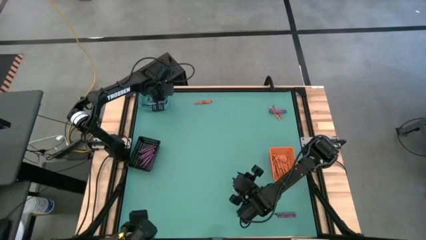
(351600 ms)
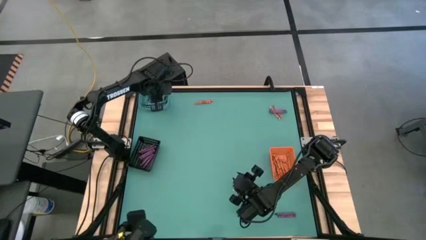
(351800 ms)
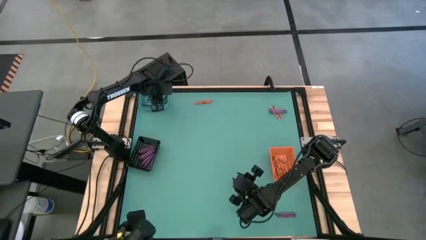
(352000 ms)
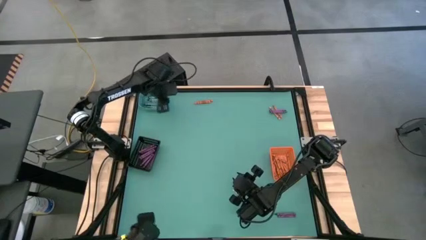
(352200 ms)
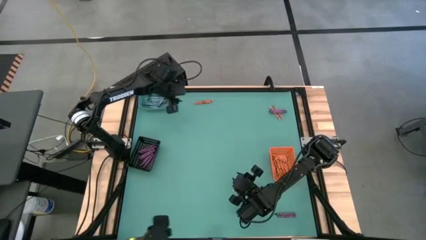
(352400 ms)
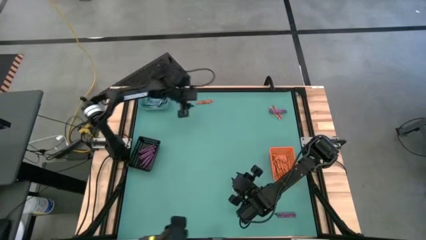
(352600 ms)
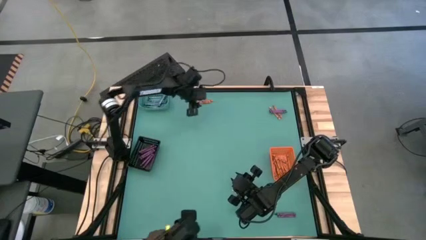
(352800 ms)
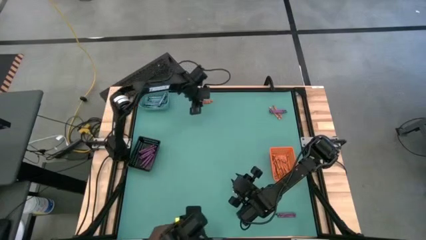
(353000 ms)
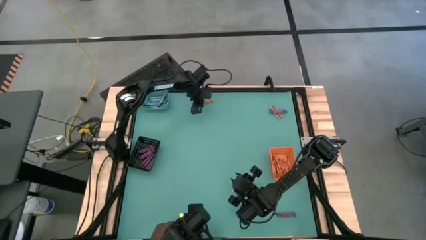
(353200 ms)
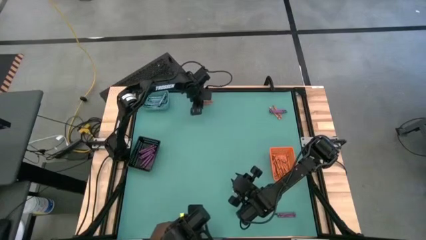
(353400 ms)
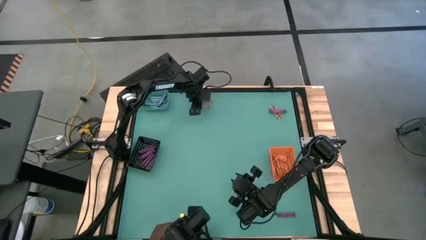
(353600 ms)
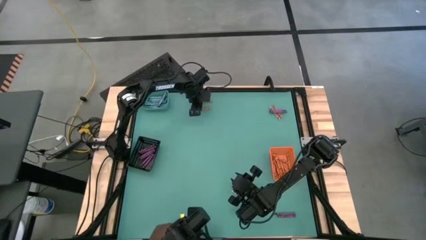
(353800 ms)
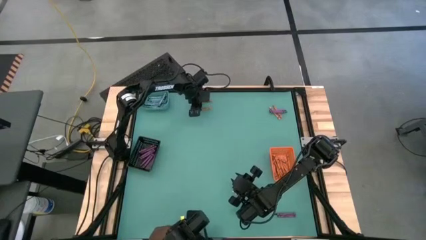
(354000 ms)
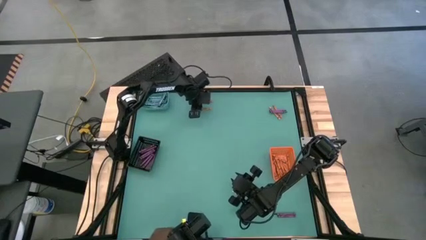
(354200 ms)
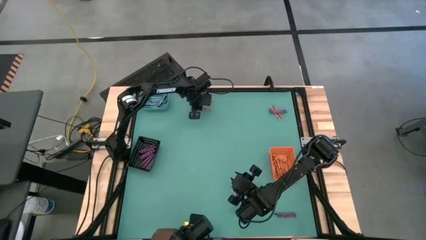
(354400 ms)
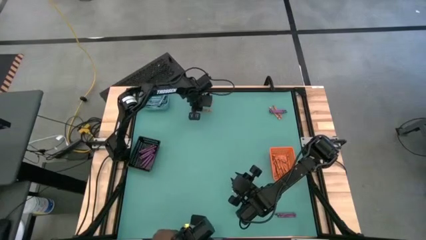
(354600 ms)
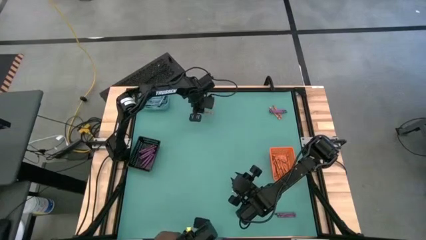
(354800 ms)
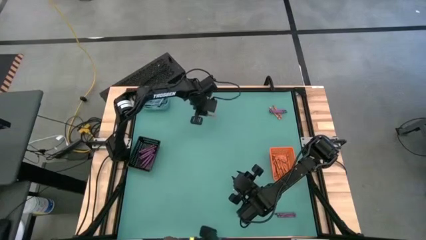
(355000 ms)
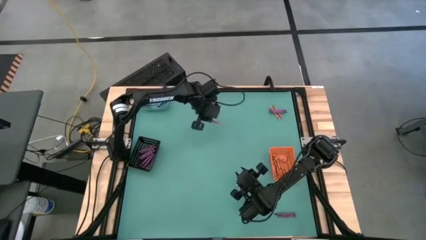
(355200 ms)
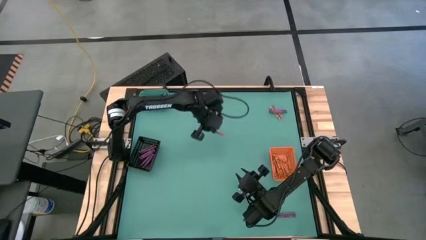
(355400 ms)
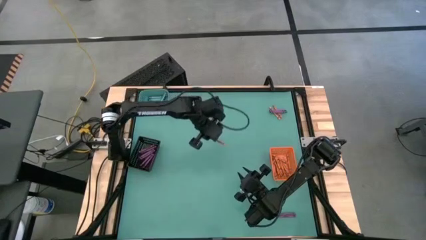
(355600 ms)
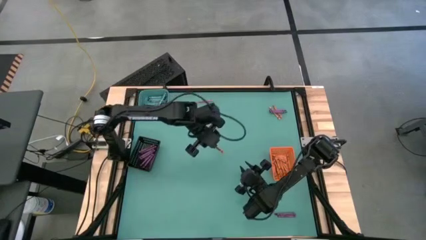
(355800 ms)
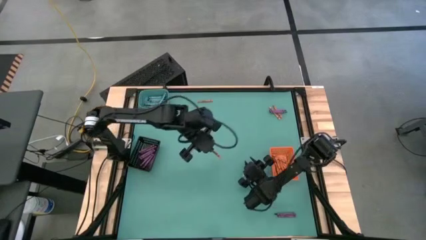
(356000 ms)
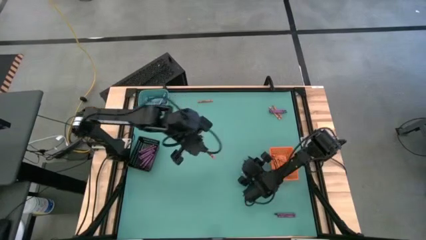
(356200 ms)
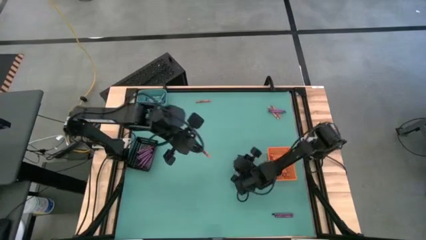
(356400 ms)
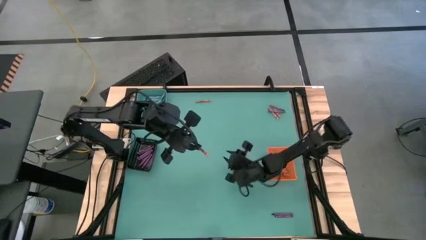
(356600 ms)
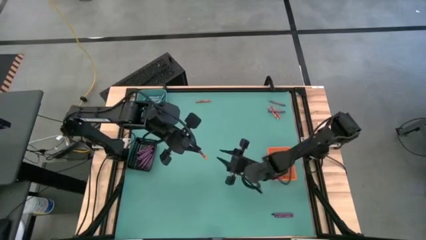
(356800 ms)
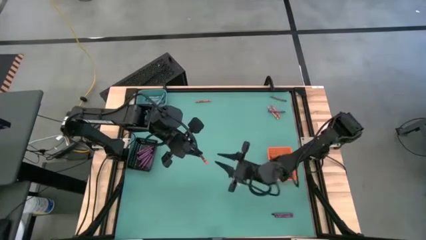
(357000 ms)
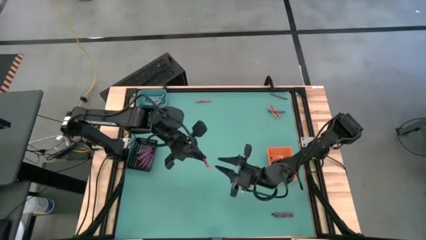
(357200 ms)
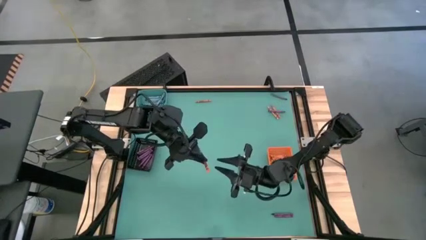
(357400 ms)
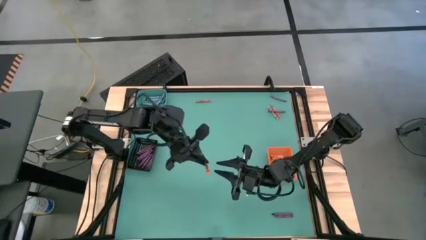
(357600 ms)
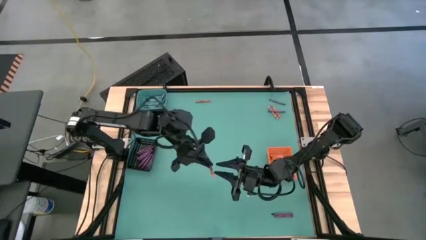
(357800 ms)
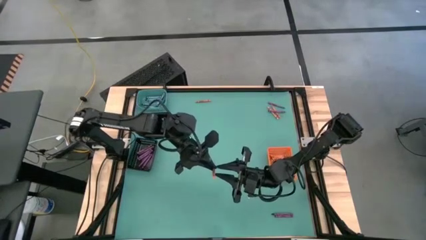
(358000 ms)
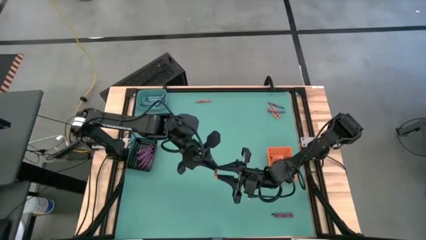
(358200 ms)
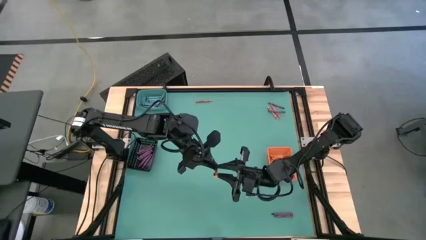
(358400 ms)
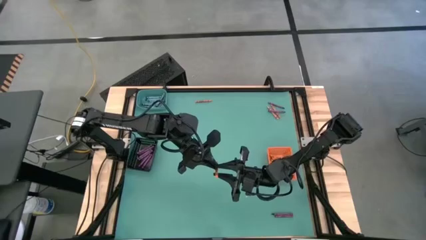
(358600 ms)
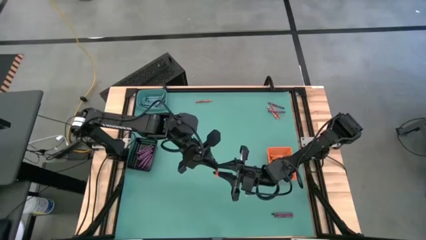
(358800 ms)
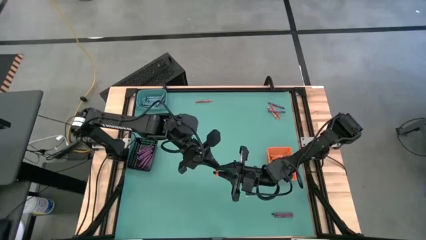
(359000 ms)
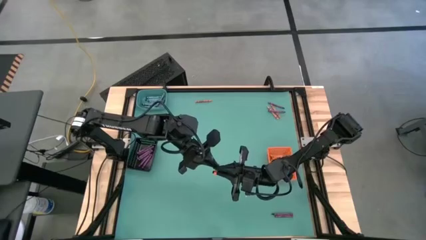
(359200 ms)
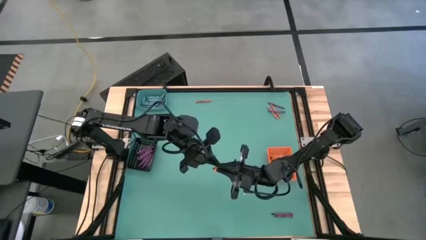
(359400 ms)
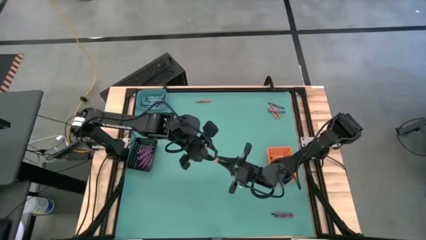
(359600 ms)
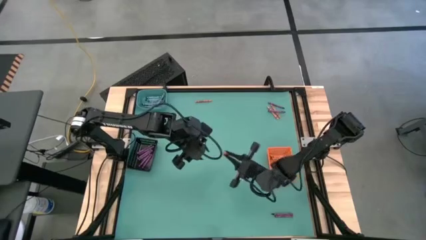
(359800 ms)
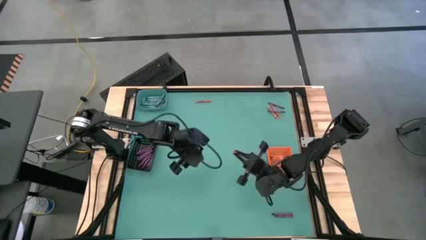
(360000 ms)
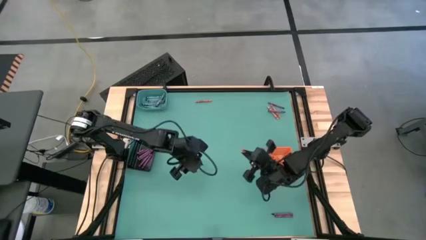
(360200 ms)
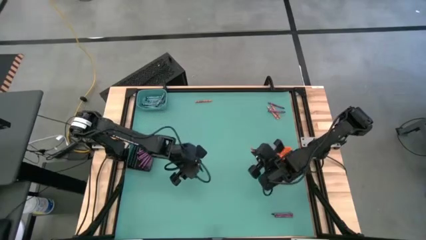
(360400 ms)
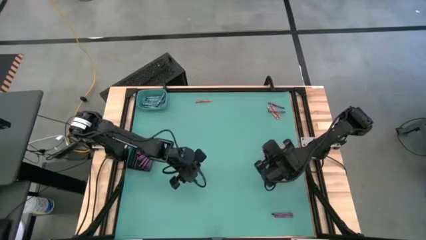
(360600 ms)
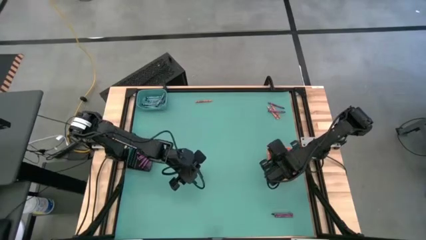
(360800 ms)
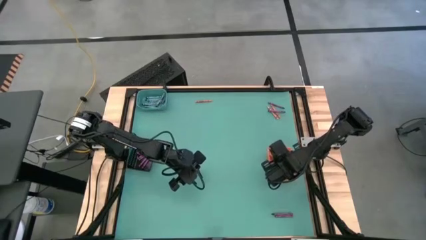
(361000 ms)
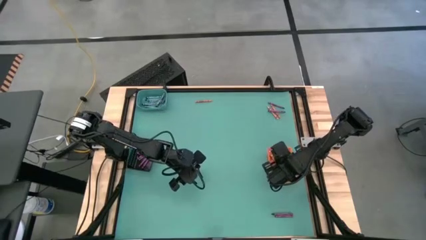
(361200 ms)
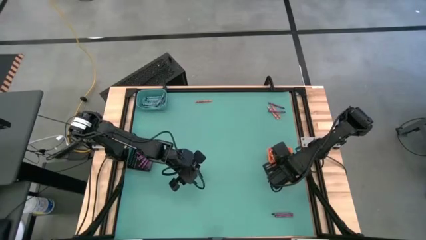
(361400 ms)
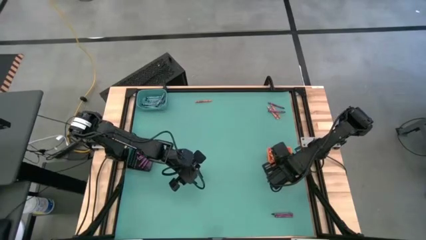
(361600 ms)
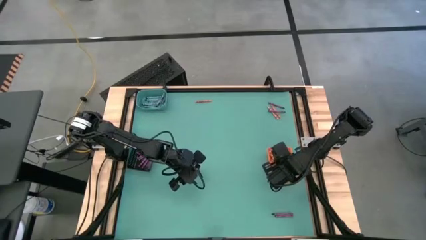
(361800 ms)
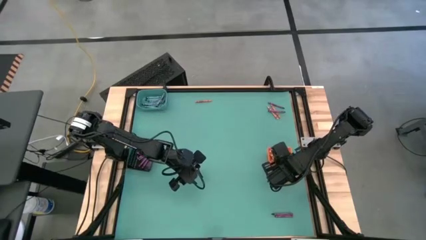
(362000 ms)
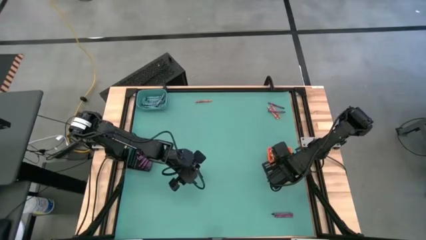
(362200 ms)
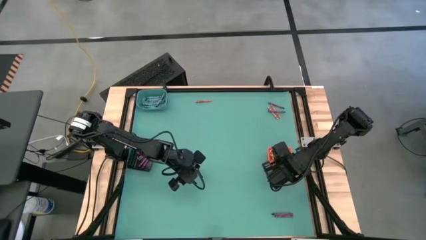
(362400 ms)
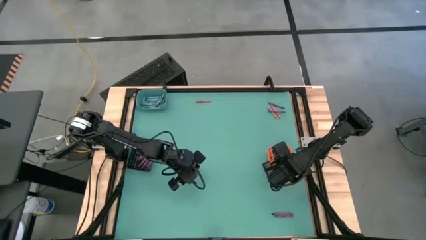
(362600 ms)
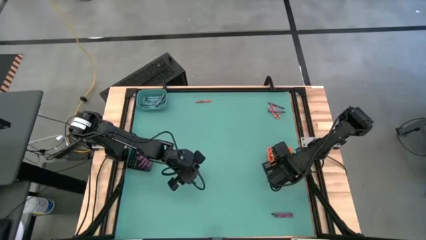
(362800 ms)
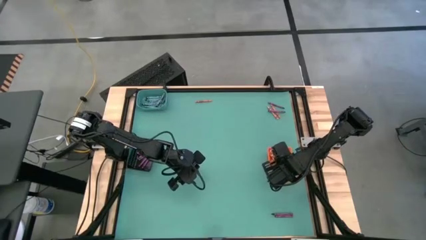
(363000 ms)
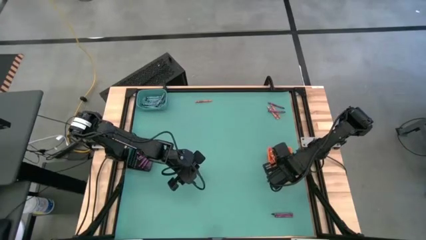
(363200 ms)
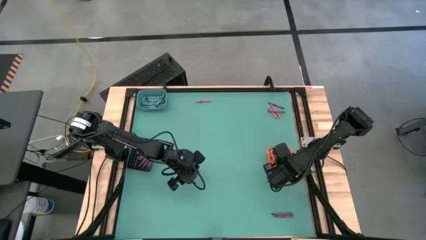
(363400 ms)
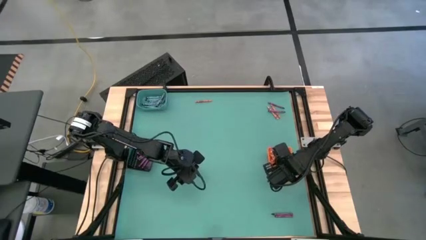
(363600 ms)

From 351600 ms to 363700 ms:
Task: Sort crayons
Put the orange crayon into the orange bin

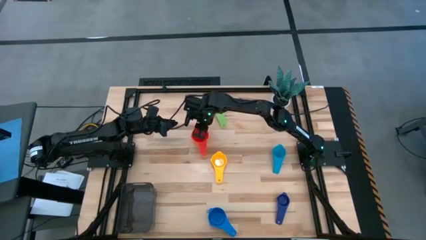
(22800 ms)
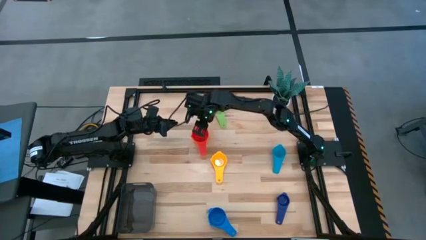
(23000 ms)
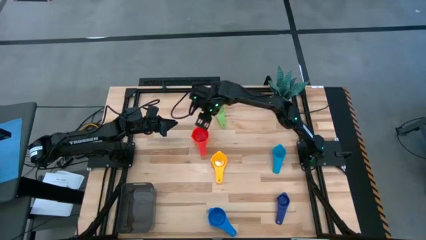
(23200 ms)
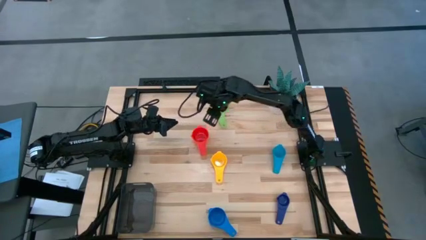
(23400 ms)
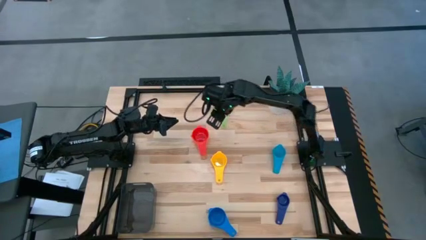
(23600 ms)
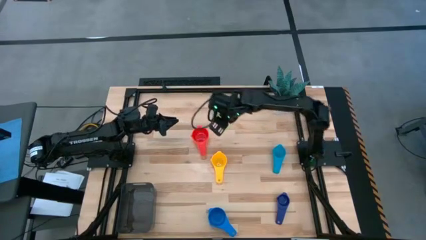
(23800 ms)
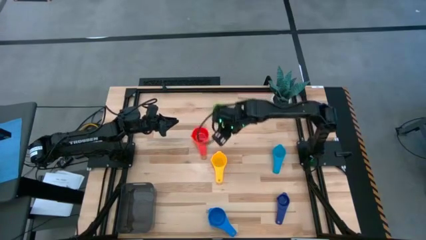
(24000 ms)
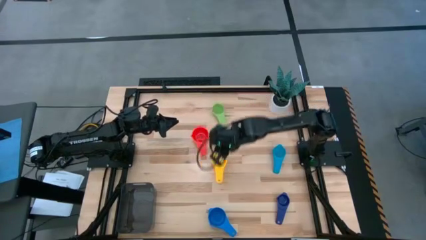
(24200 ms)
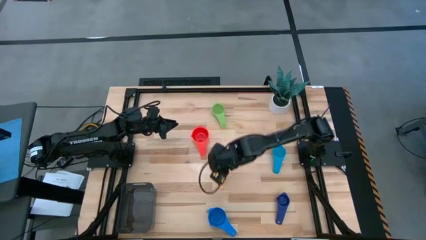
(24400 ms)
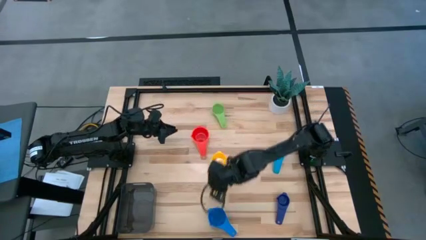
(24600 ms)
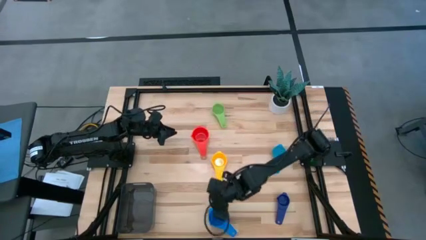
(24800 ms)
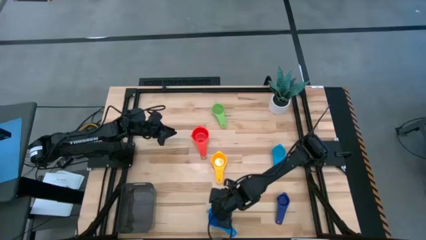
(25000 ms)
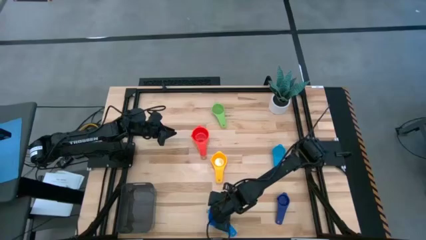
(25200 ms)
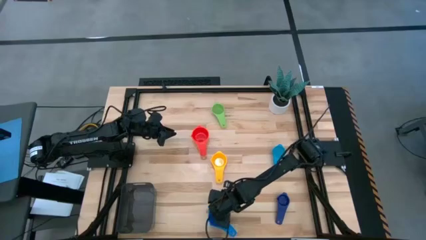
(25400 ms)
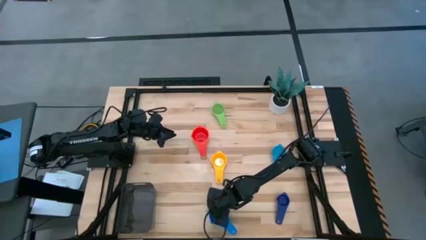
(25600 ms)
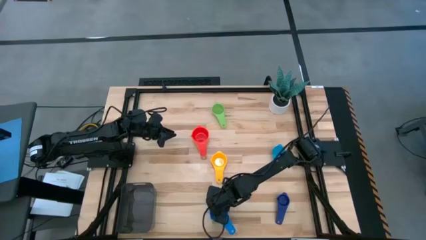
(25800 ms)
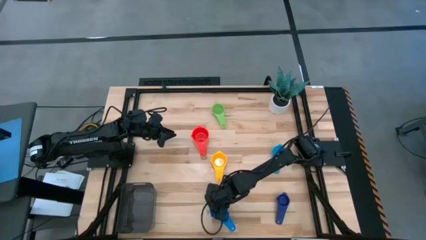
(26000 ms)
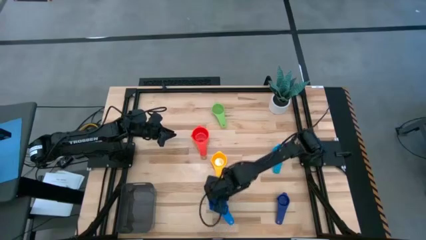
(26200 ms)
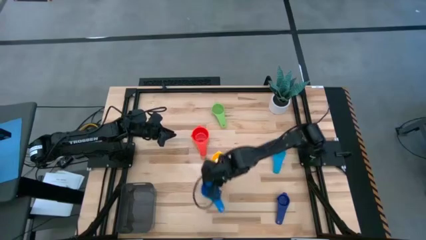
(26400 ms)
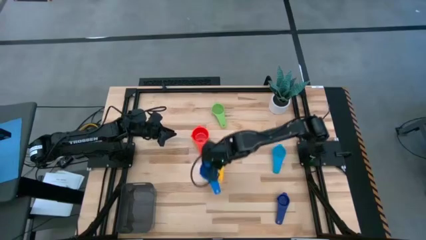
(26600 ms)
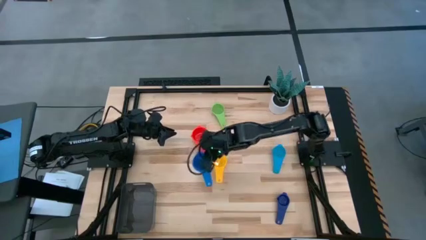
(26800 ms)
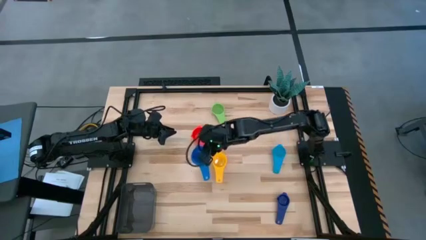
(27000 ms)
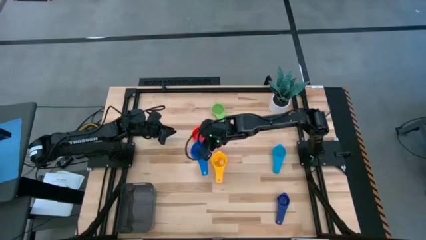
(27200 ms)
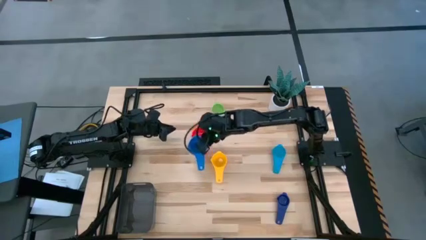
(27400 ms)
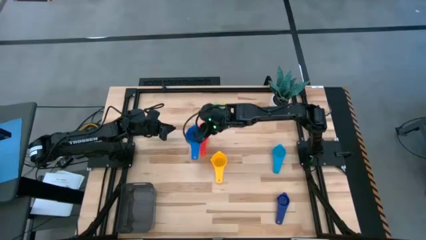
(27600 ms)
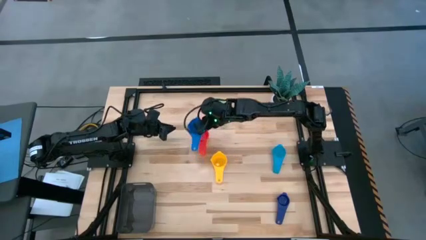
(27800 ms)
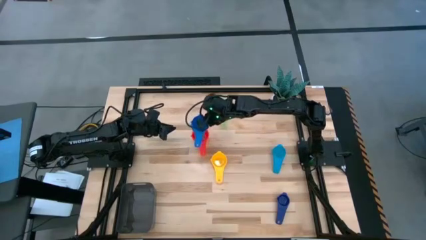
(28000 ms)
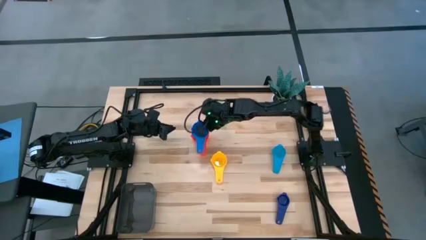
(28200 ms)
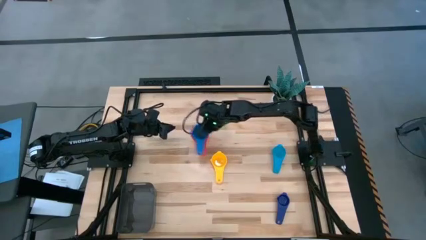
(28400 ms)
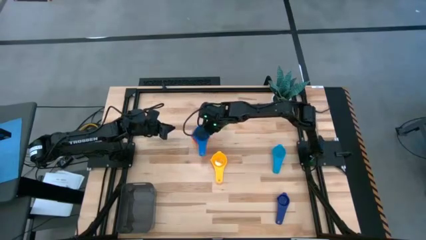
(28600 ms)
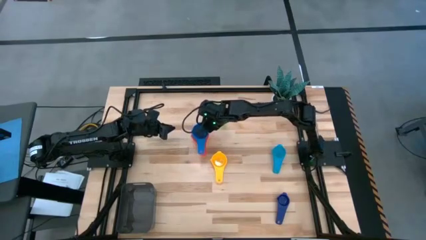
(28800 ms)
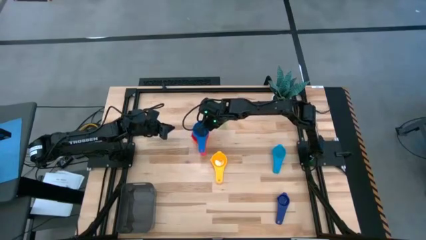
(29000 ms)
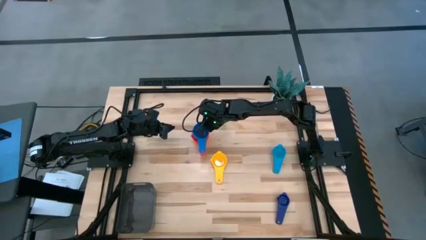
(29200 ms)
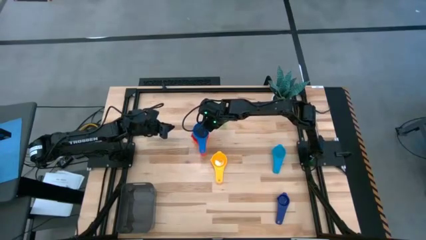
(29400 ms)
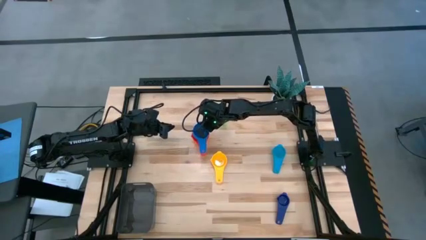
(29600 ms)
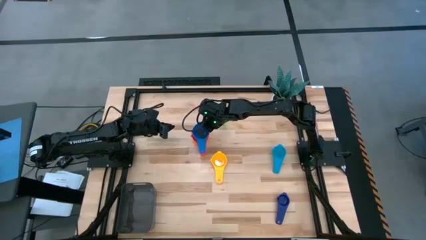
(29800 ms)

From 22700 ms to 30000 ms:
Task: Nest measuring cups in basket
Stack the dark blue measuring cup on top of the red measuring cup
